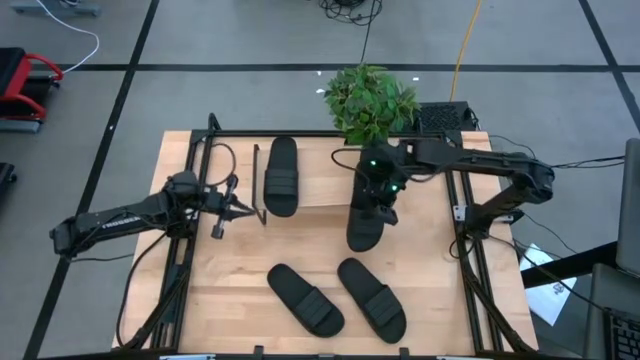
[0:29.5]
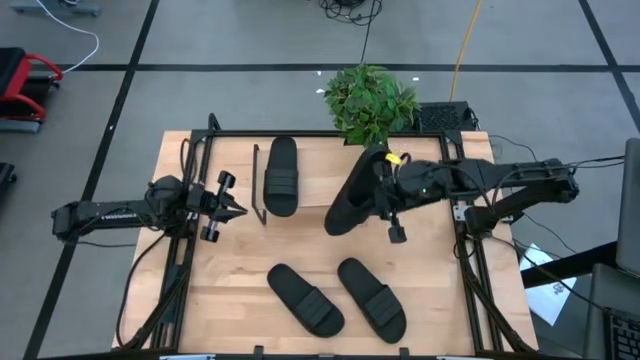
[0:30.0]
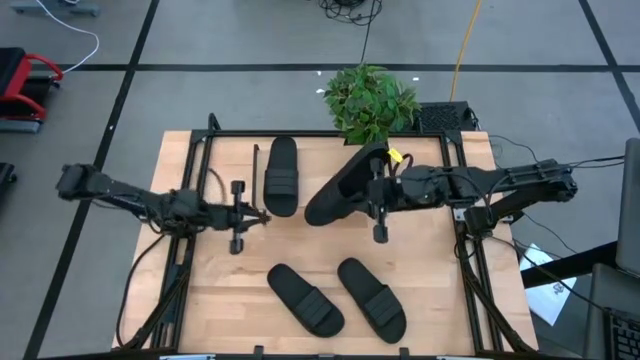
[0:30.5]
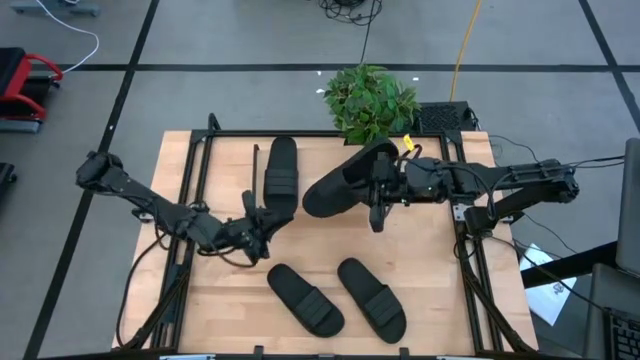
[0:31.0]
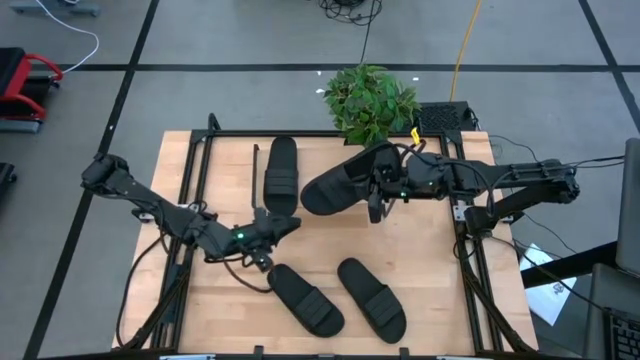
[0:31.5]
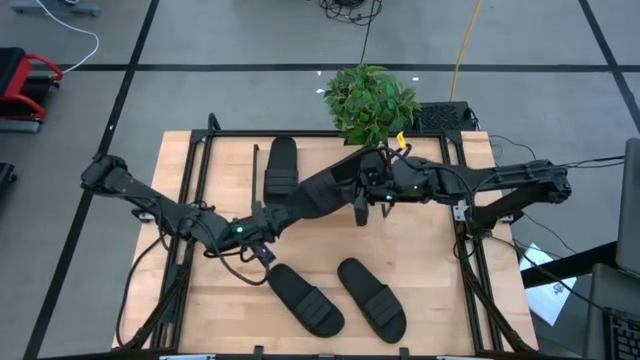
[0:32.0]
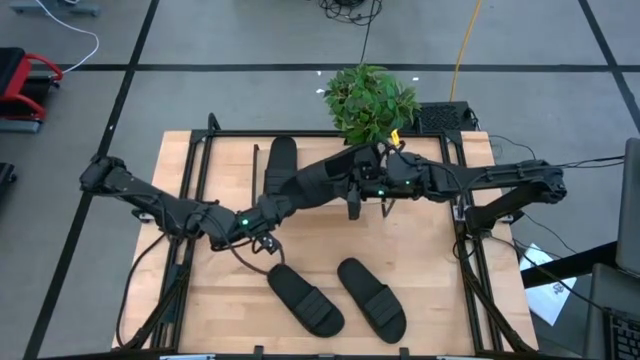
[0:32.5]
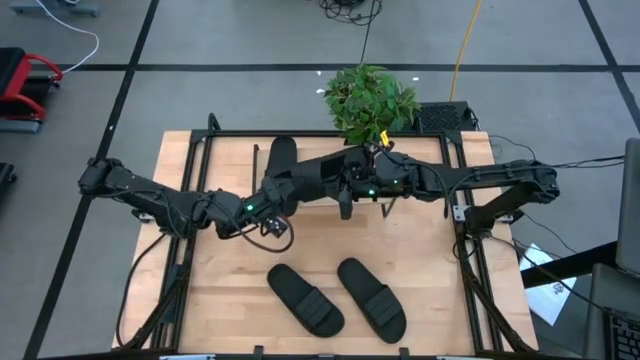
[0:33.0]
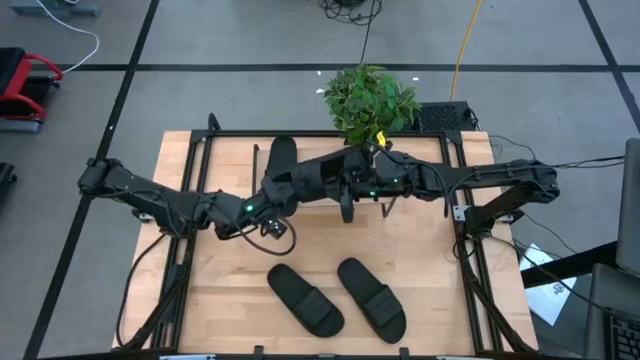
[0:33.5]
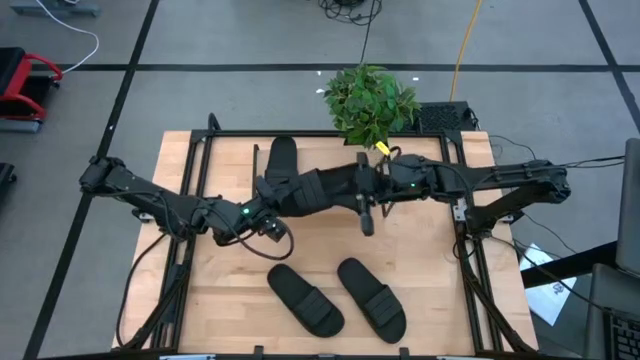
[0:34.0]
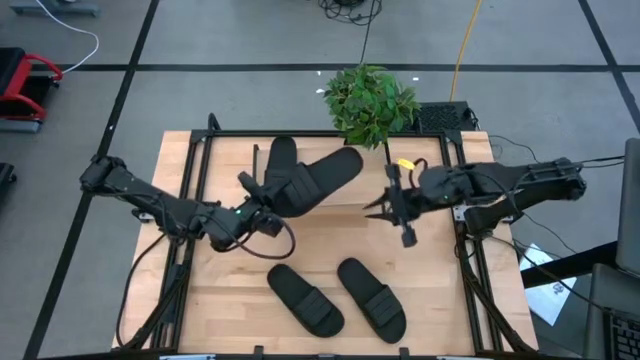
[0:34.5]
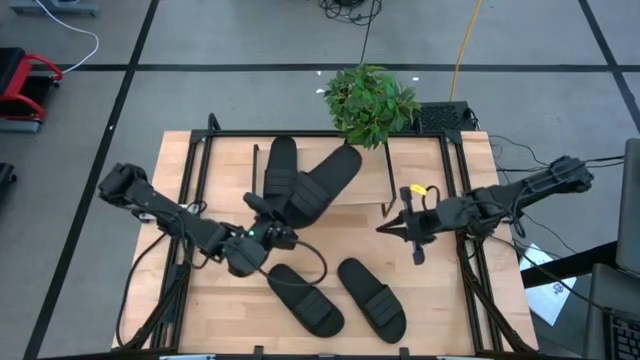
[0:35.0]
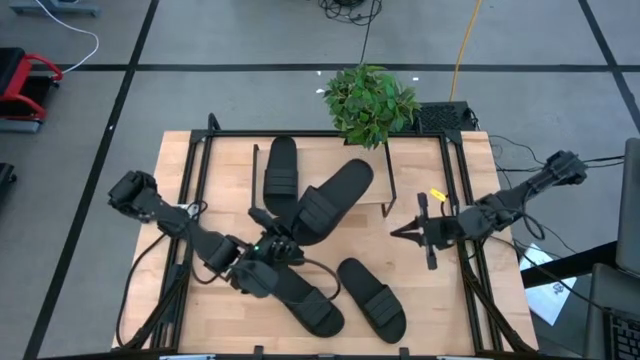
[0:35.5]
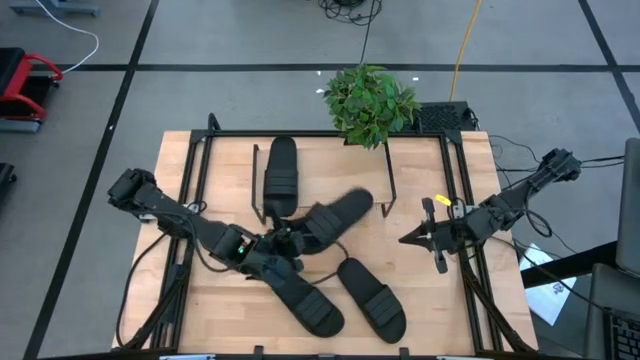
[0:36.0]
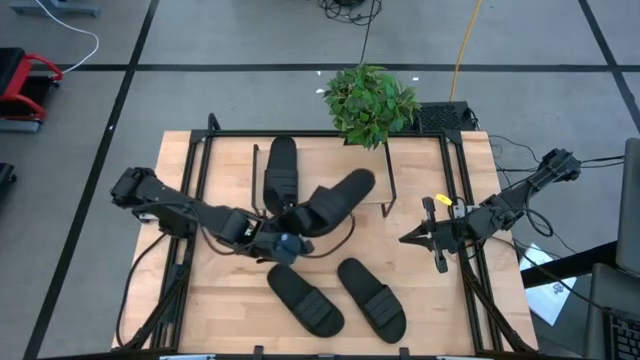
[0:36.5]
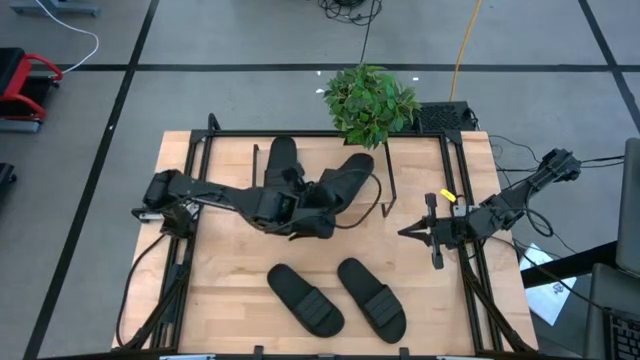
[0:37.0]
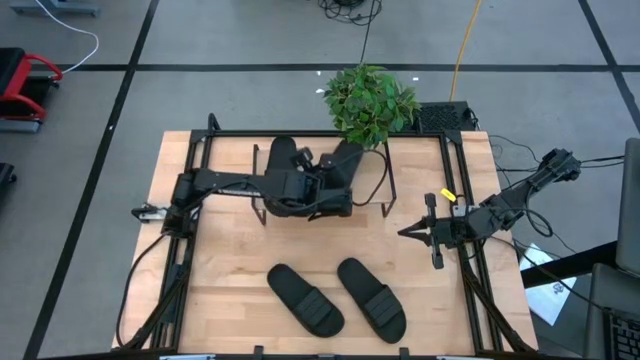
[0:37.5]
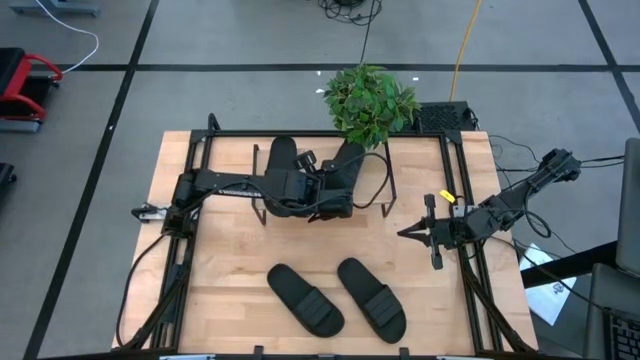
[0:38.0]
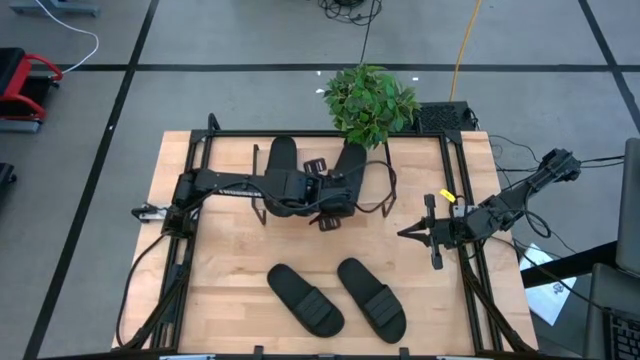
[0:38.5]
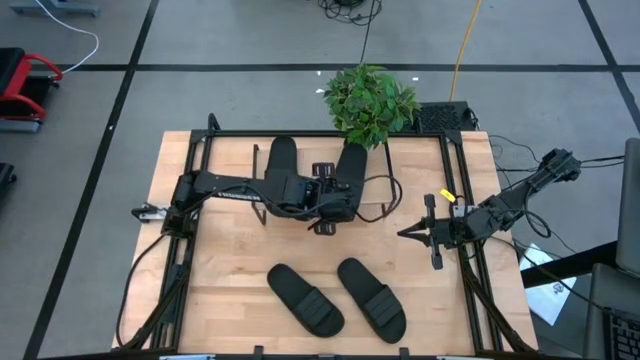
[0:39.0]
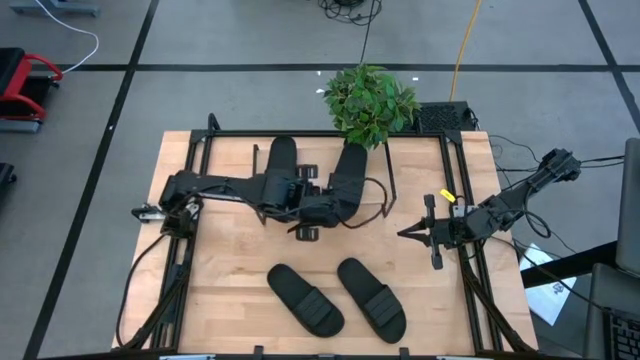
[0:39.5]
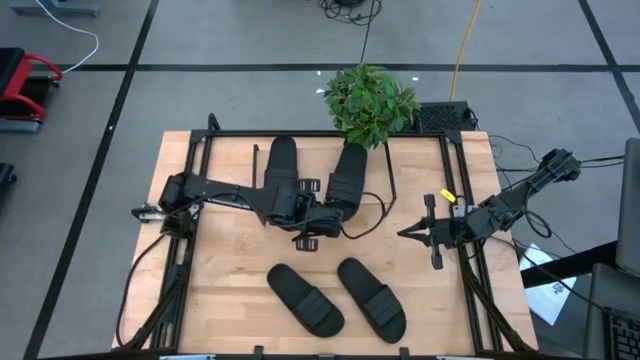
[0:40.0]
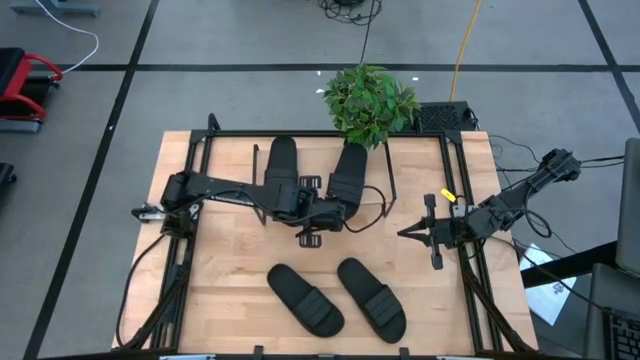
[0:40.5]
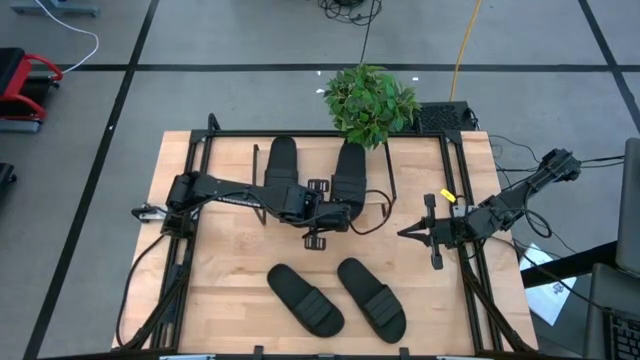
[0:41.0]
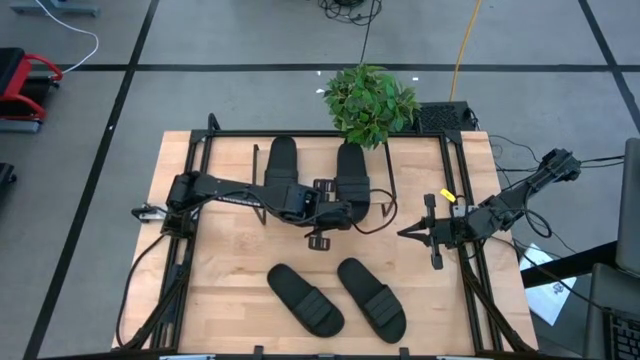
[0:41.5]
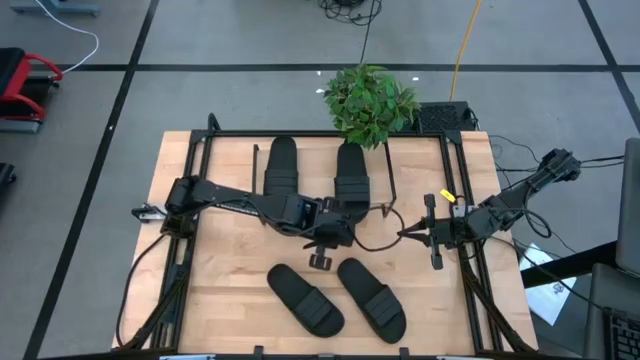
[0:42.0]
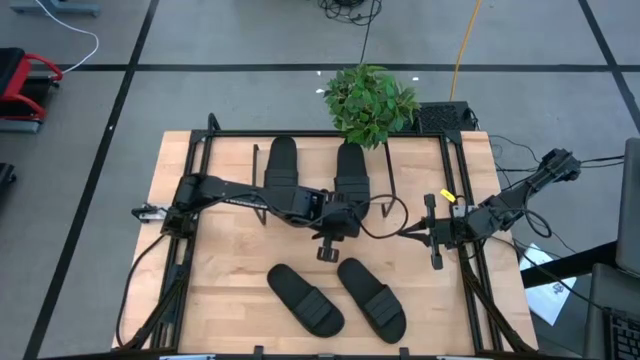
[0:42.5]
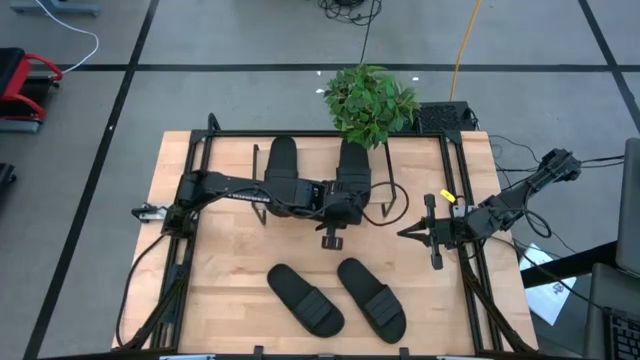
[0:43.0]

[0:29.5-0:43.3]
Task: Pick and place slides into the shelf
Put the black slide on the shelf

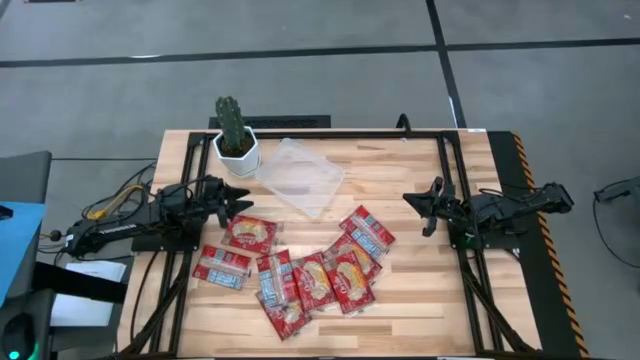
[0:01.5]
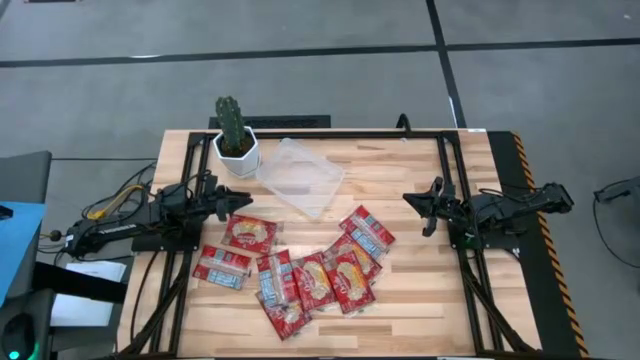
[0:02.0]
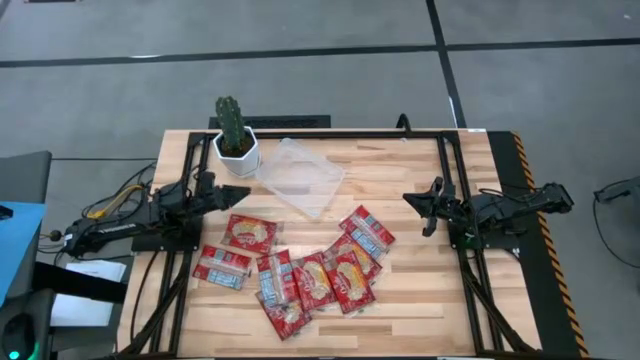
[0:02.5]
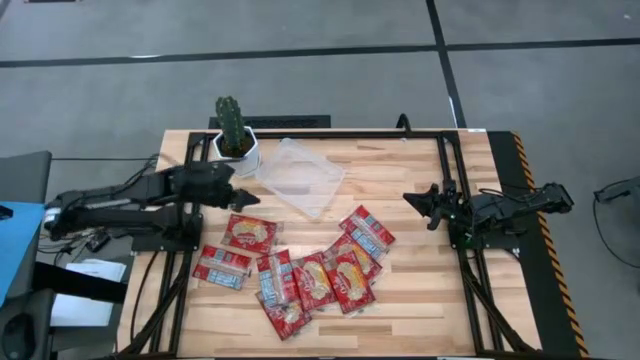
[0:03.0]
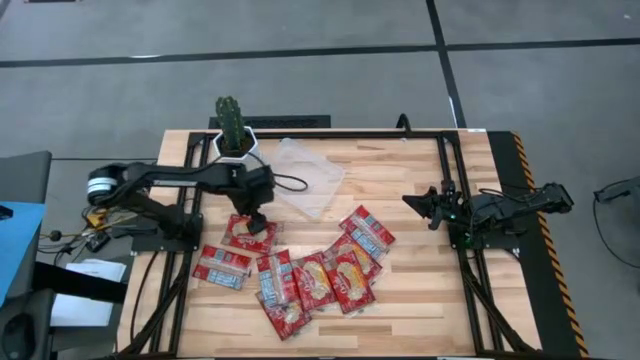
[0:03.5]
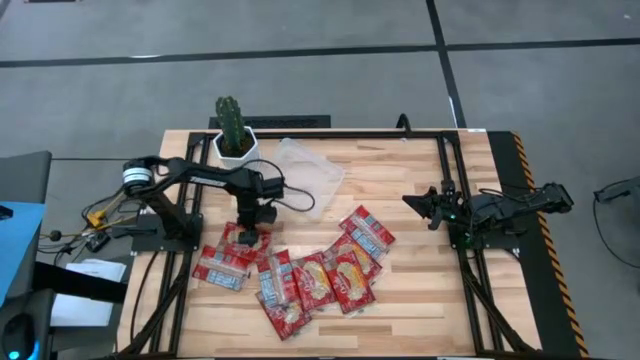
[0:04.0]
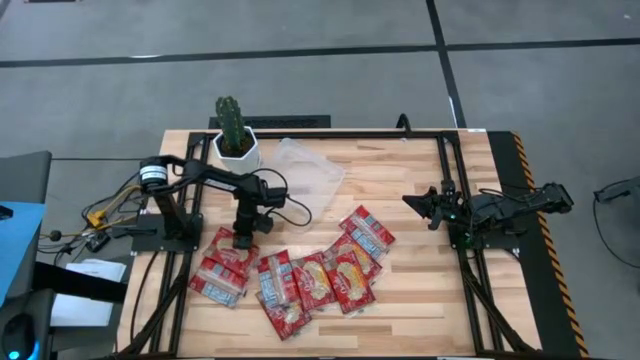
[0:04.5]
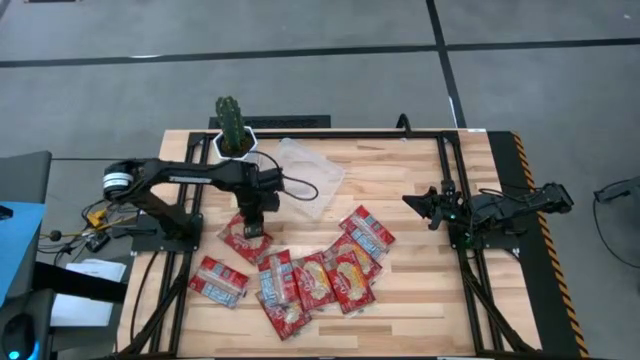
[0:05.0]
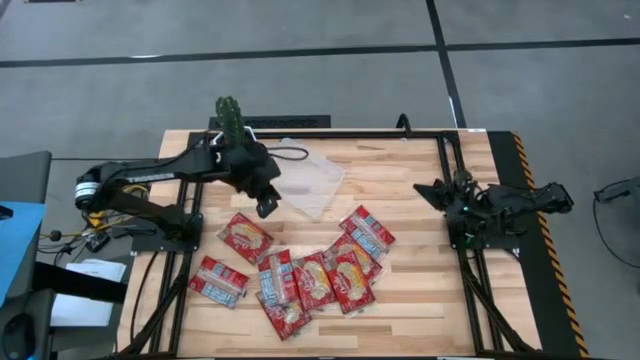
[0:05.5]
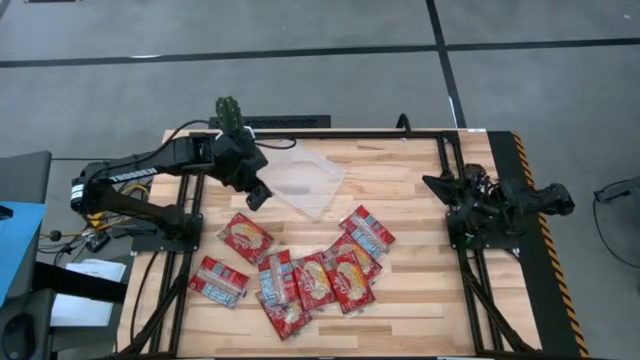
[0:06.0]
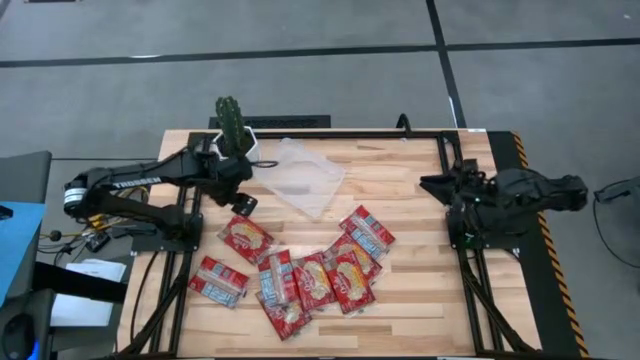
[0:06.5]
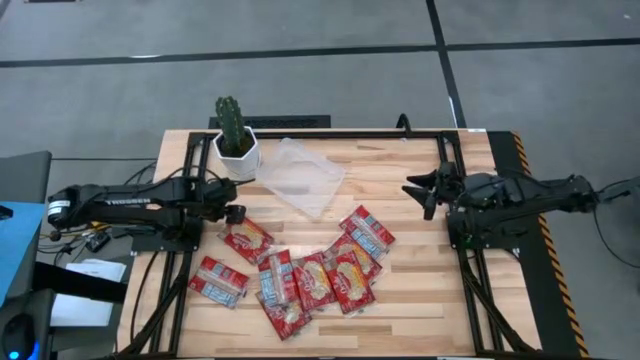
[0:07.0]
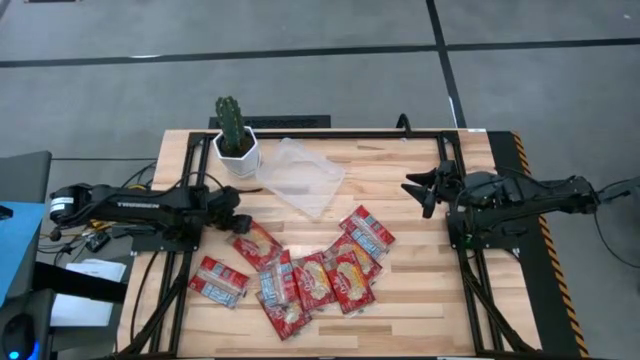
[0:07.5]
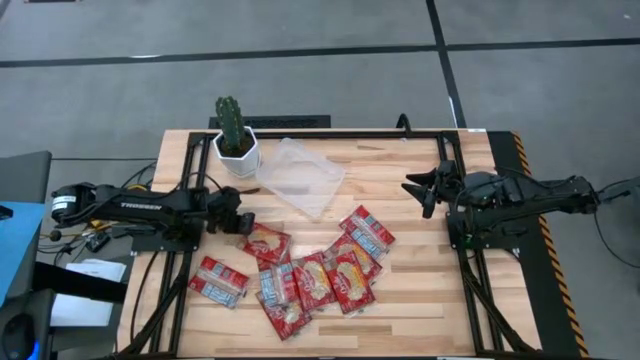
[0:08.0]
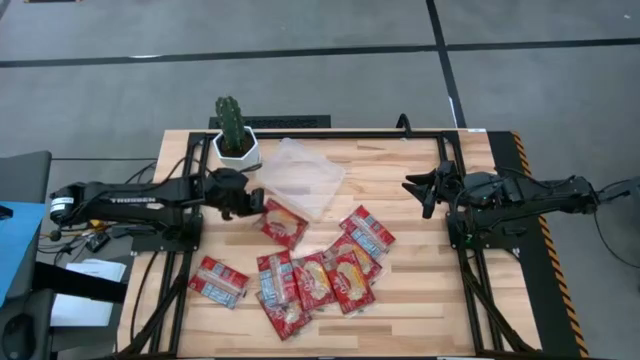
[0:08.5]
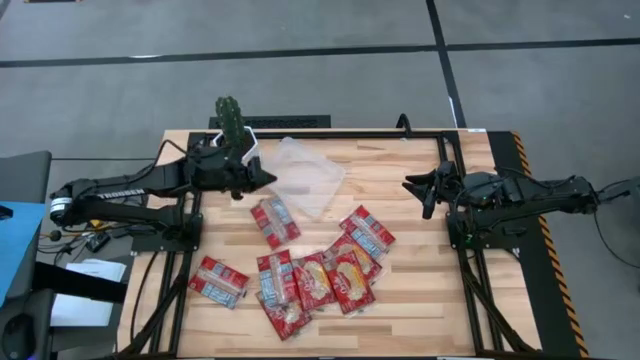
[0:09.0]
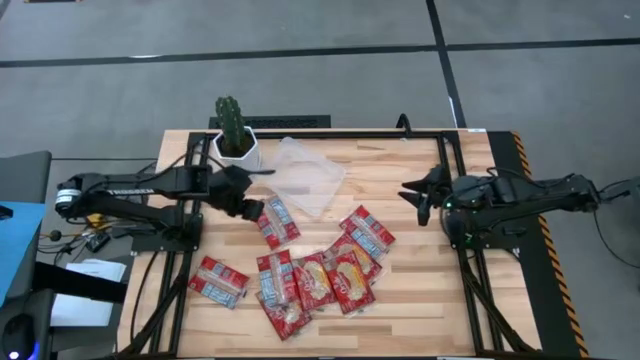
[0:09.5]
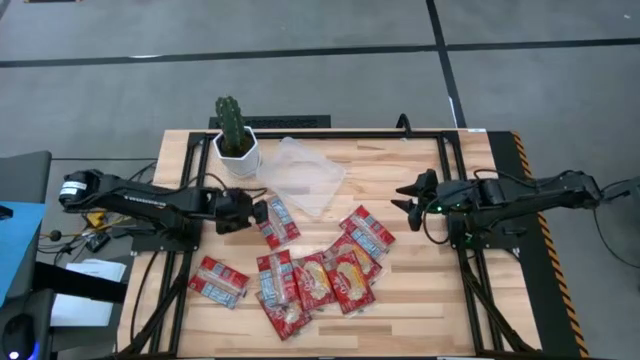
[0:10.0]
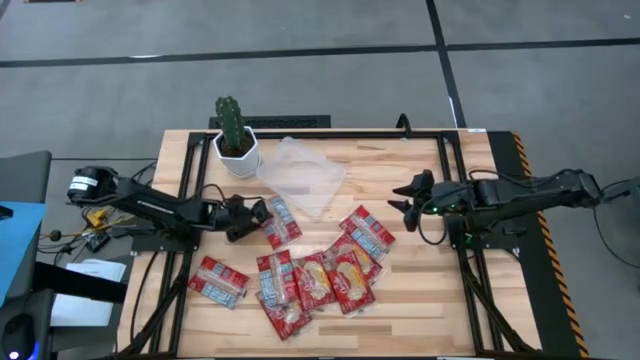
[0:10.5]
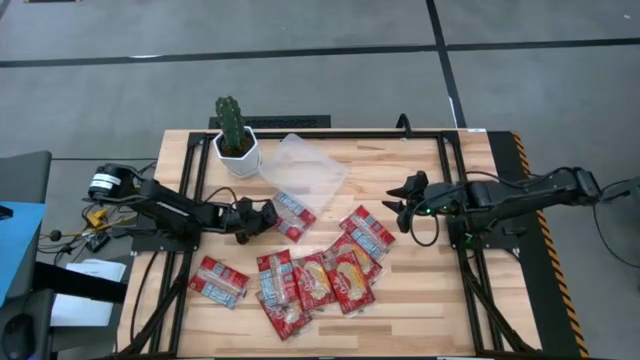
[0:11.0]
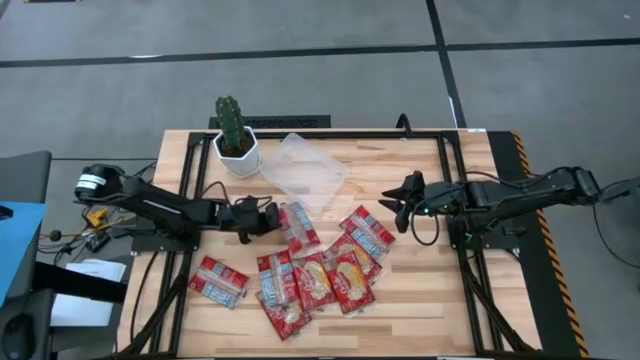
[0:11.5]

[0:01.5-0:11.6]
Task: Sort popcorn bags into baskets
Put the red popcorn bag into the transparent bin
